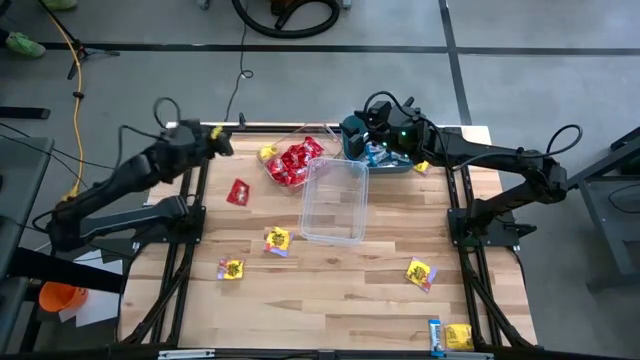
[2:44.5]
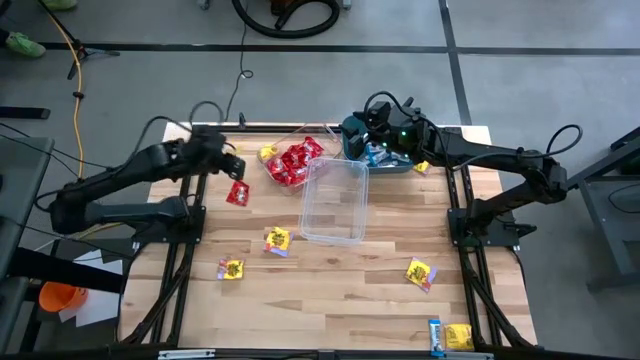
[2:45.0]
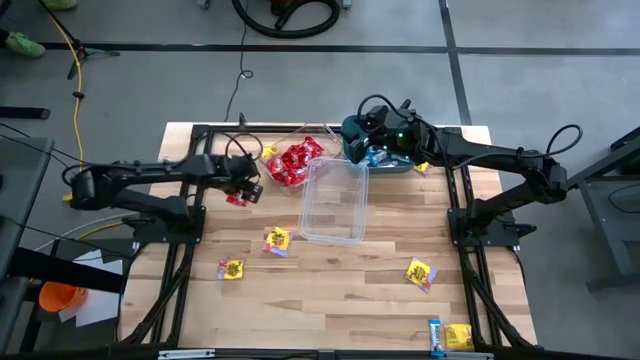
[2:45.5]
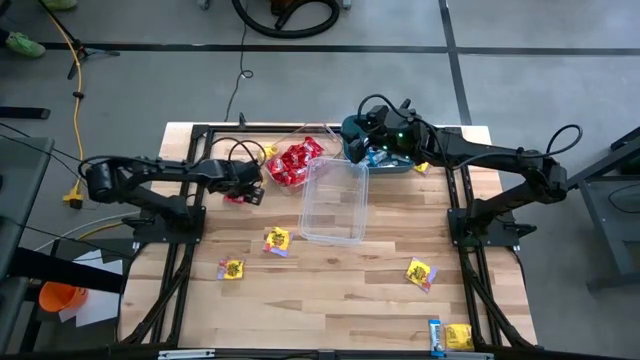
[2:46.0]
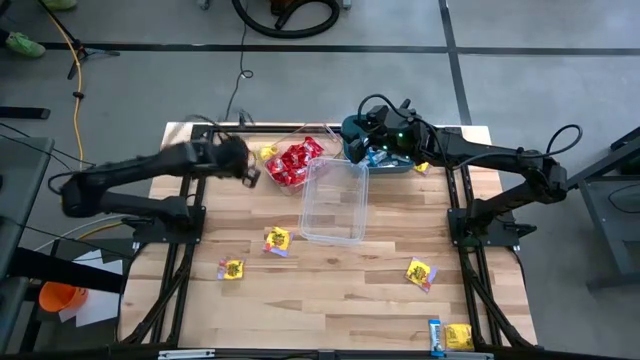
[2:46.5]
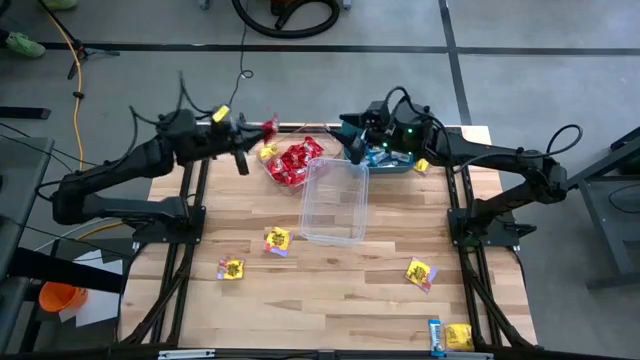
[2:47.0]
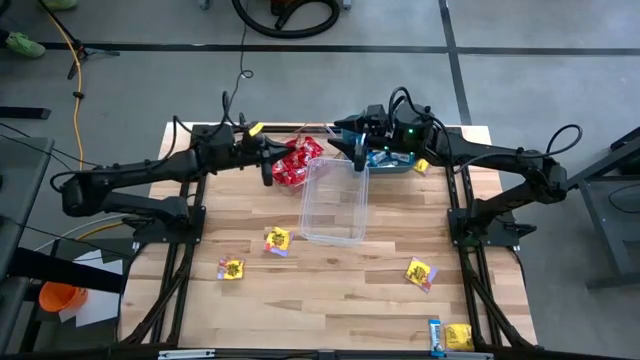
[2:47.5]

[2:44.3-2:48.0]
Task: Sort candy
Put the red candy into the transparent bin

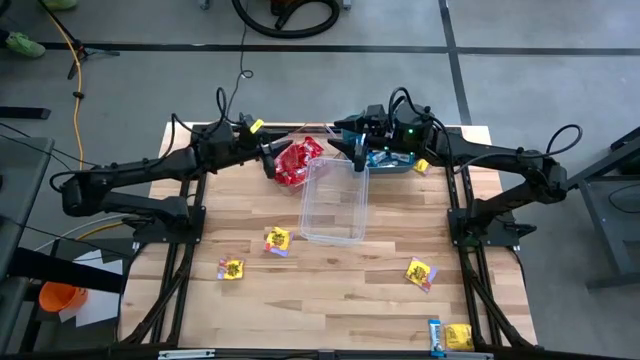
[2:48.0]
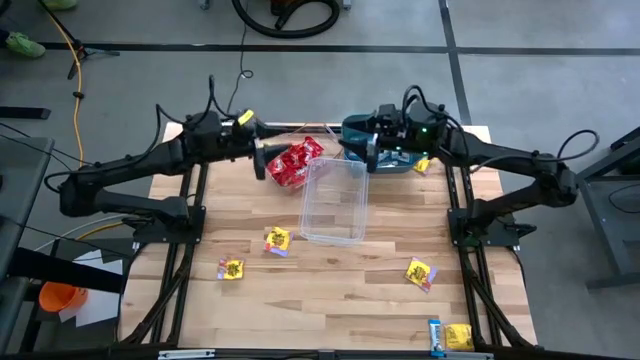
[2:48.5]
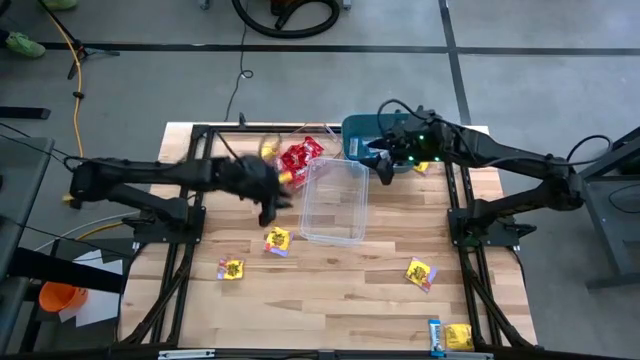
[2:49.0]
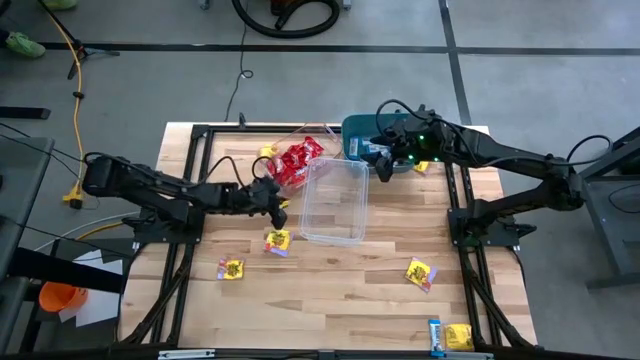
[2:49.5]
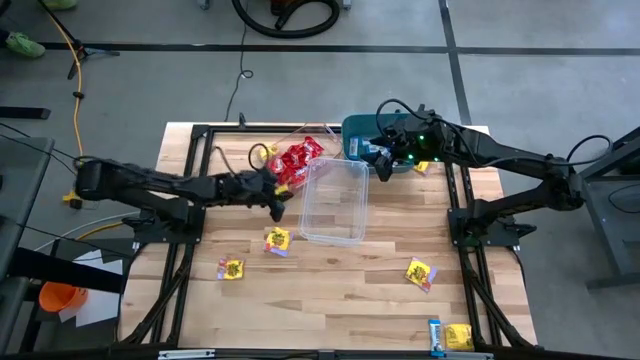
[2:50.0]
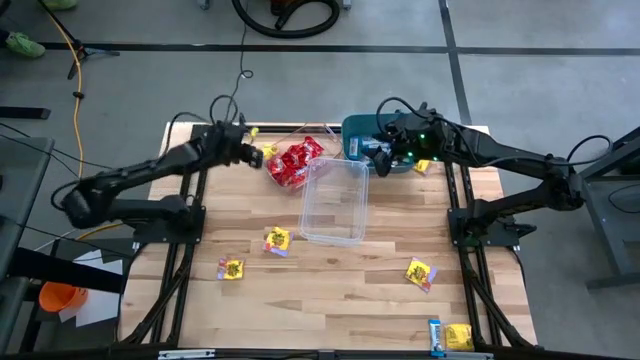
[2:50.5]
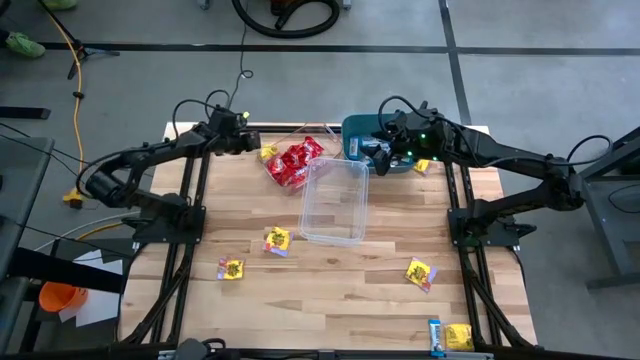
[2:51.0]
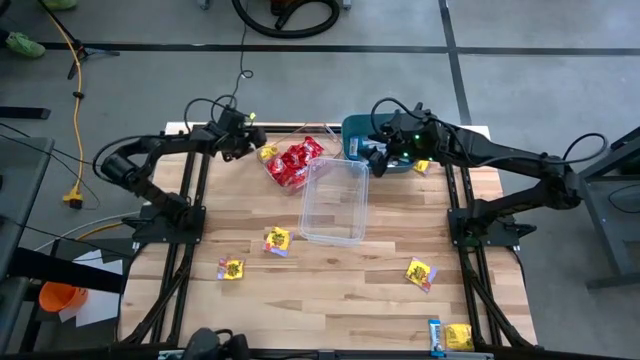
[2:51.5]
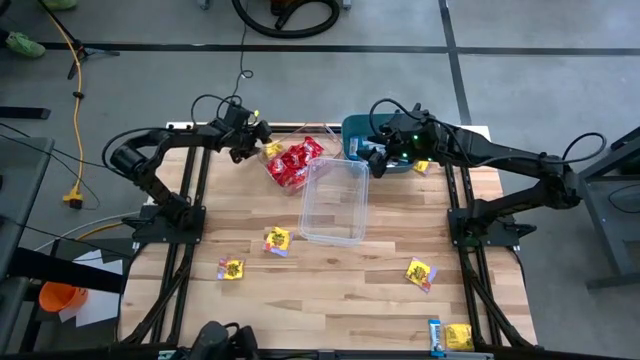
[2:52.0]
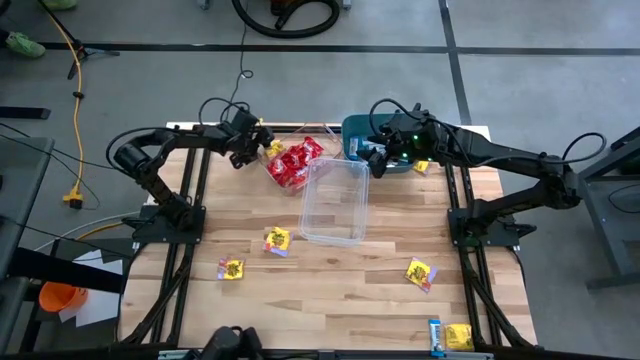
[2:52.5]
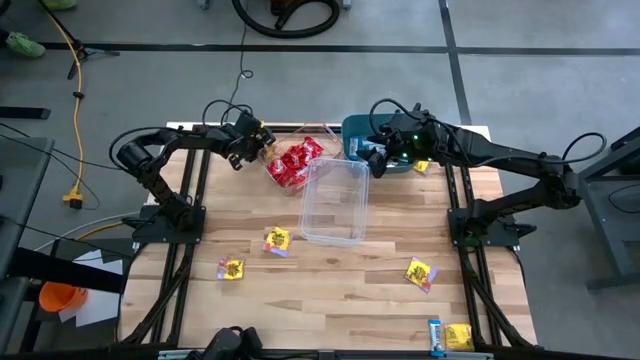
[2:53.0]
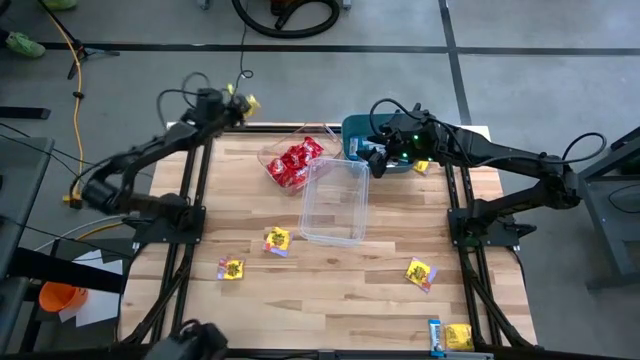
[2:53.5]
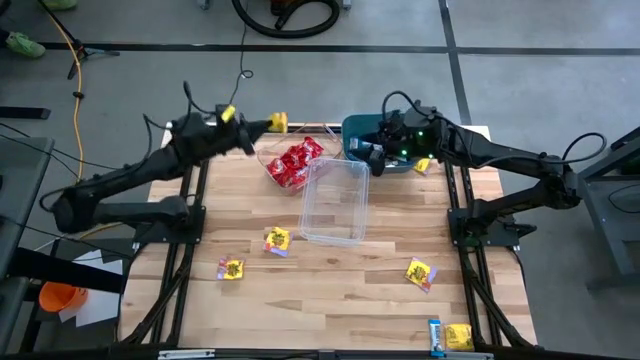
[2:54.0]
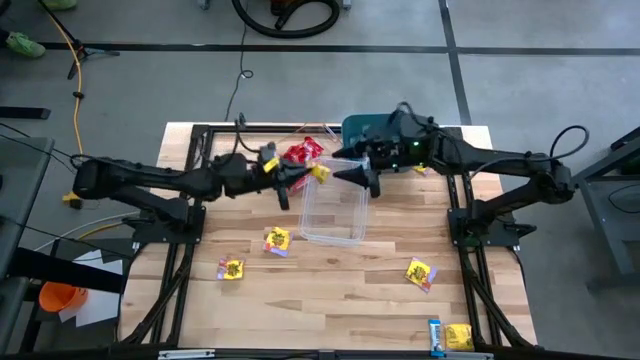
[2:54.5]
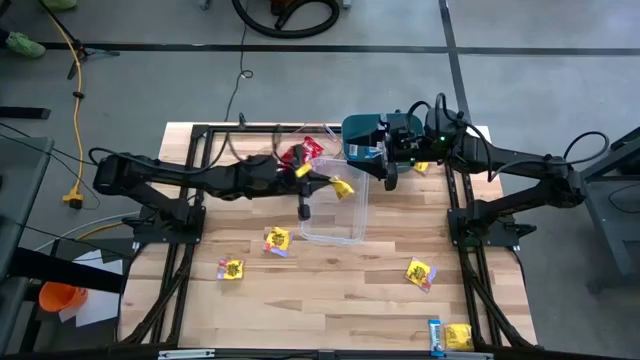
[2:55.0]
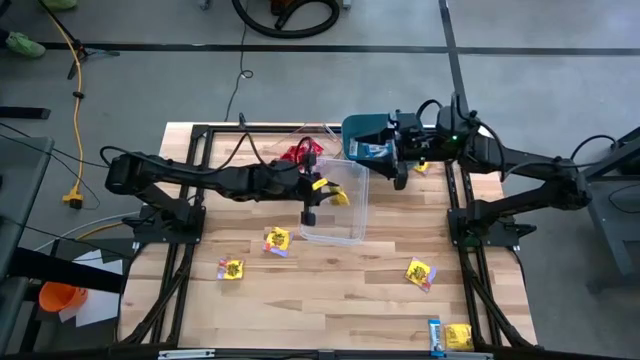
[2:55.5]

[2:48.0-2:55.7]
Put the yellow candy into the transparent container

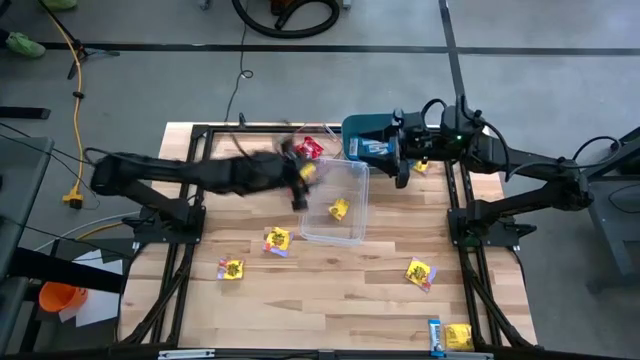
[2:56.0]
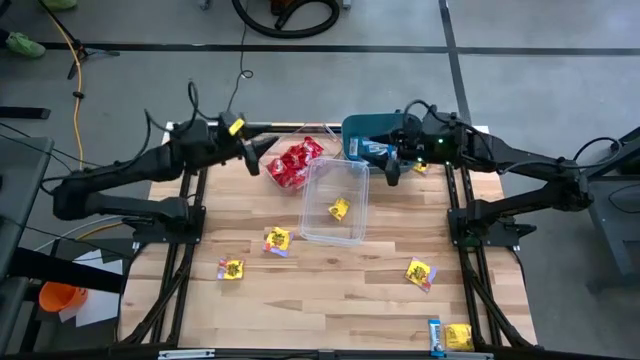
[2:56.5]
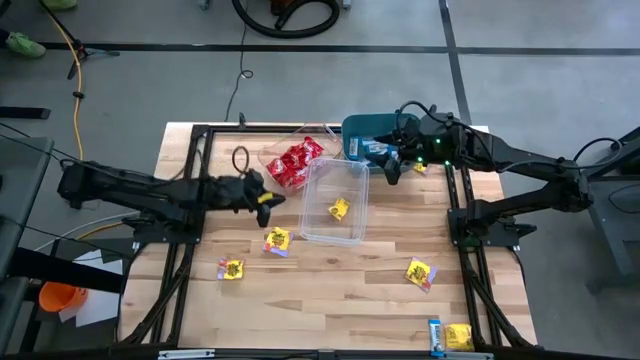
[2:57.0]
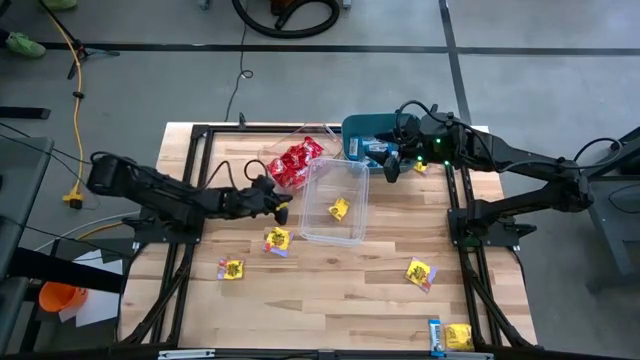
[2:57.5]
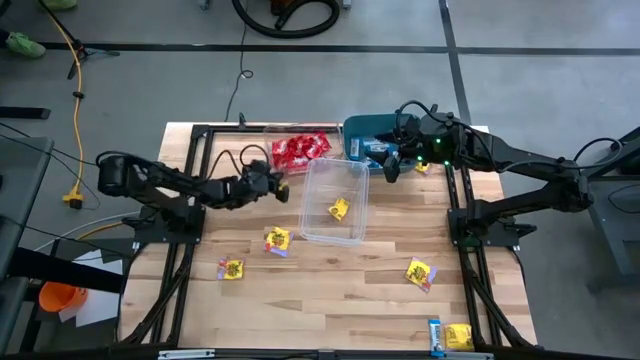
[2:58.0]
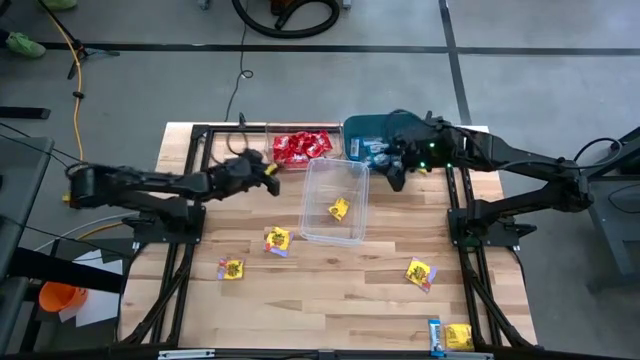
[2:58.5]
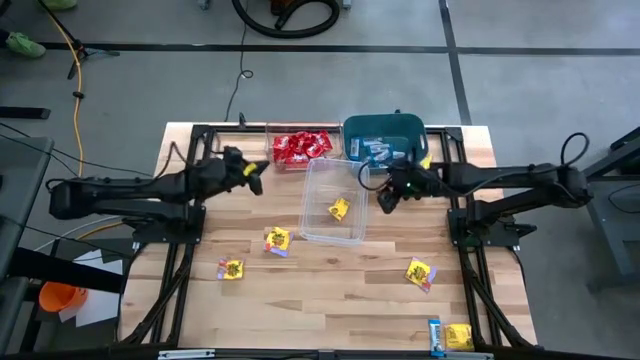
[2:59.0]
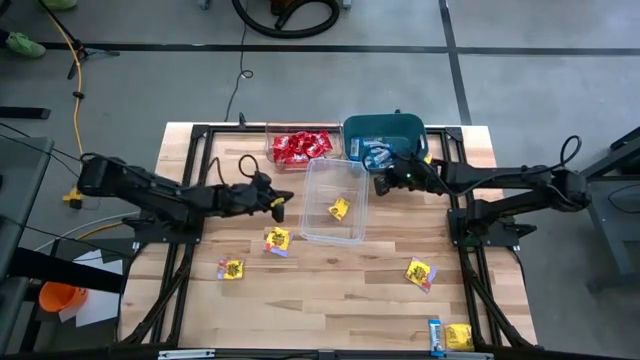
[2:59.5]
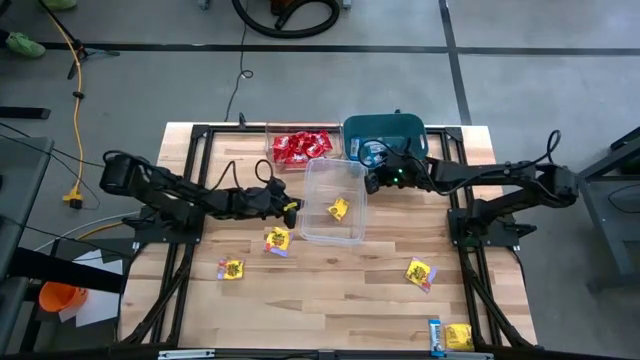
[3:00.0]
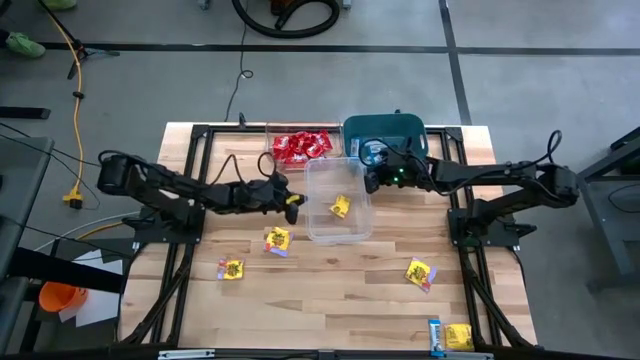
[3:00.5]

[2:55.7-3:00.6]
Adjust the transparent bin and container

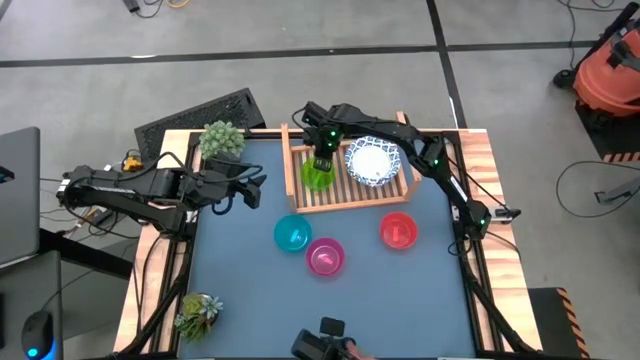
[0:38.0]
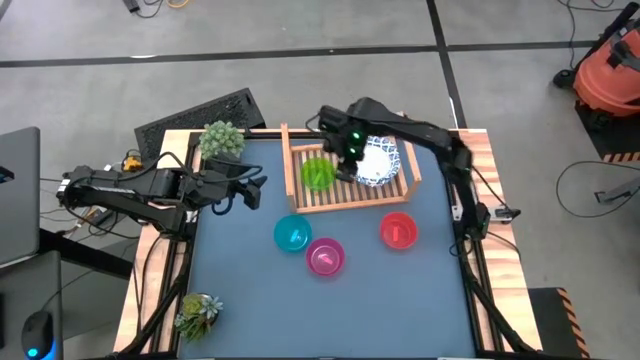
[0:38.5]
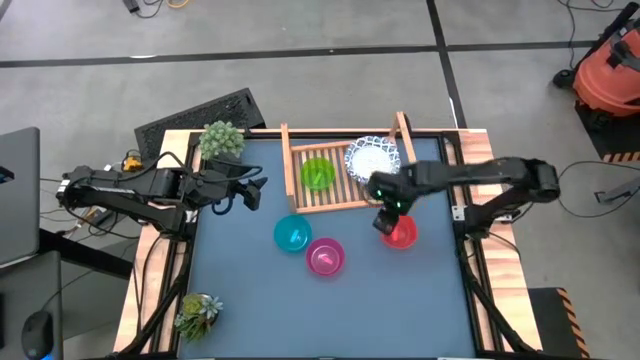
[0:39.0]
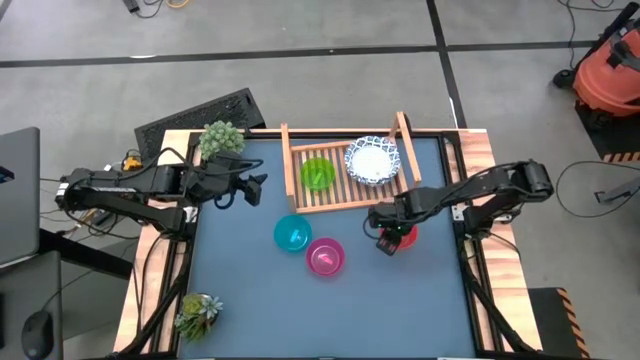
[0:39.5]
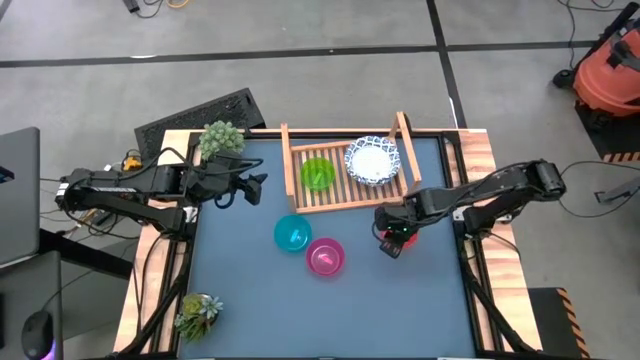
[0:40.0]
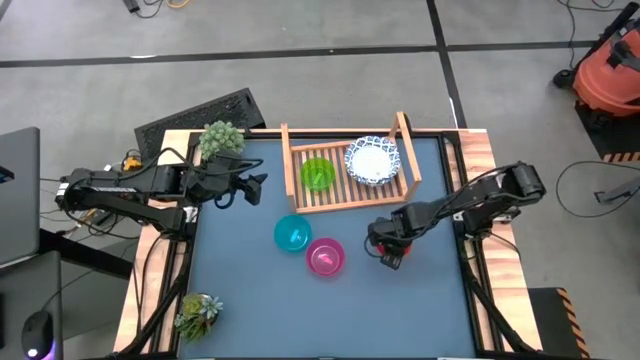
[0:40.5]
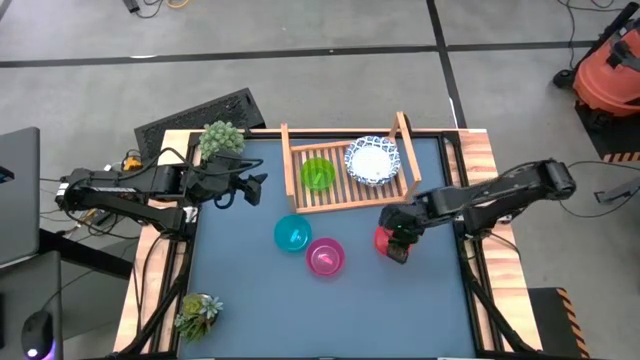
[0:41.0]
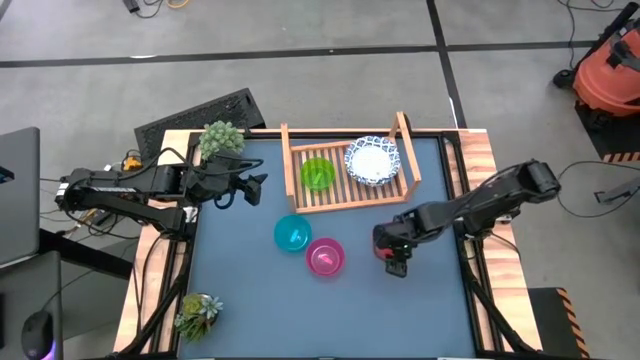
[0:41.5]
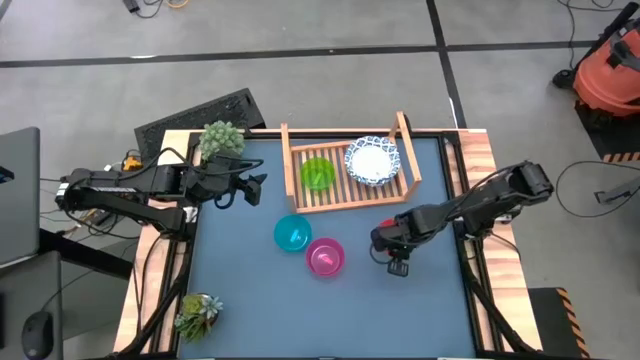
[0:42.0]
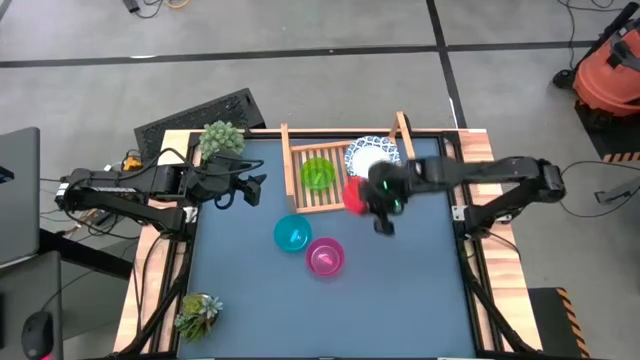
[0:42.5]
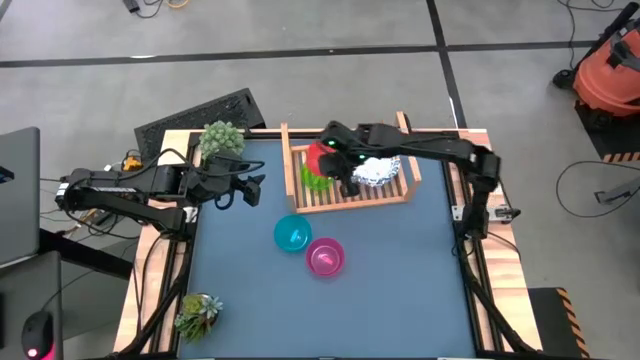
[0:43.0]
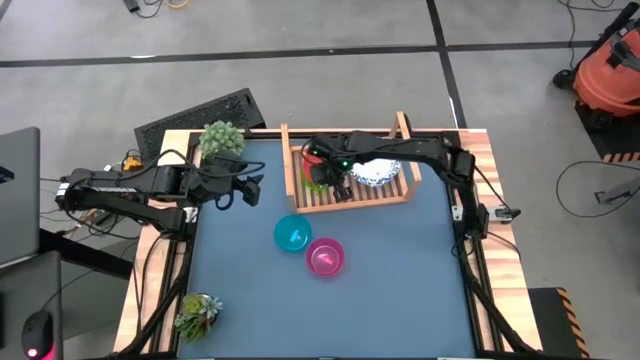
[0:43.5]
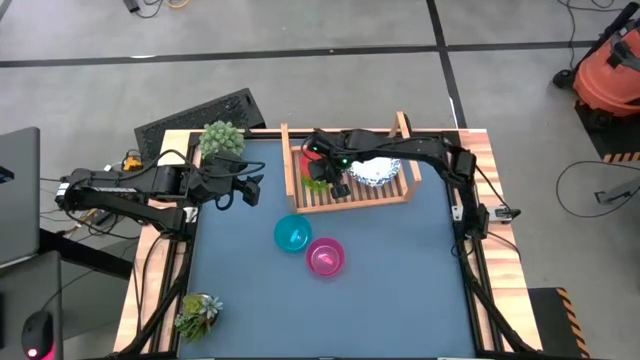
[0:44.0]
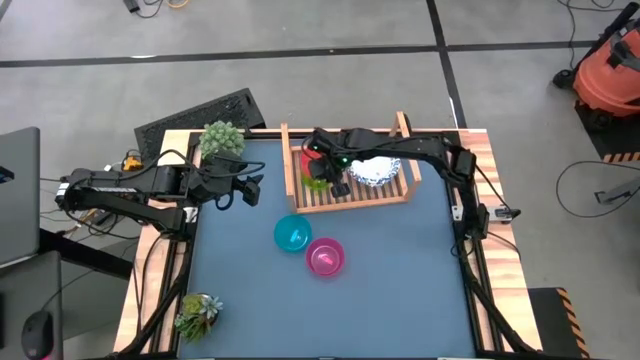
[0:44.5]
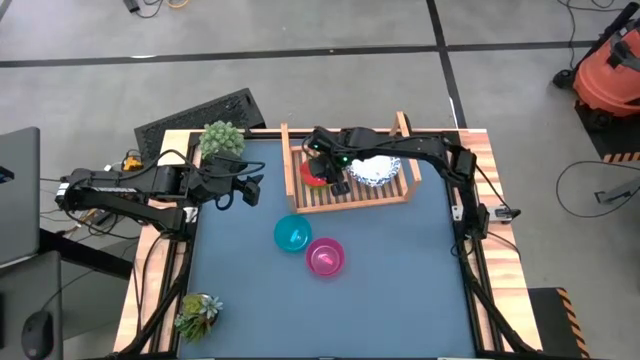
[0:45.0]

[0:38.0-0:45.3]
Task: Place and stack bowls onto a shelf
Stack the orange bowl on top of the green bowl on the shelf
